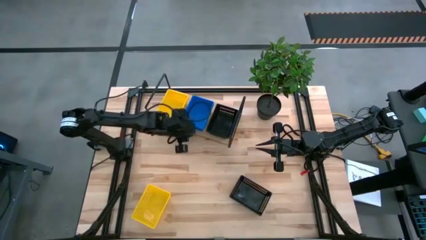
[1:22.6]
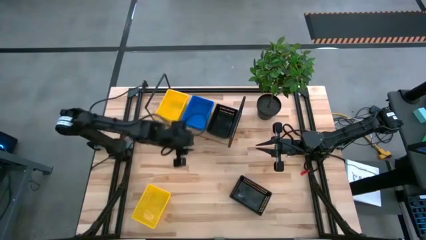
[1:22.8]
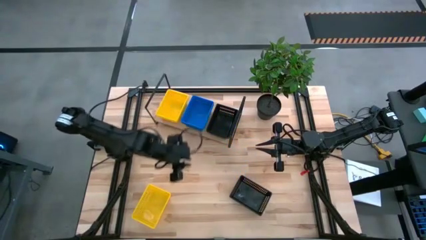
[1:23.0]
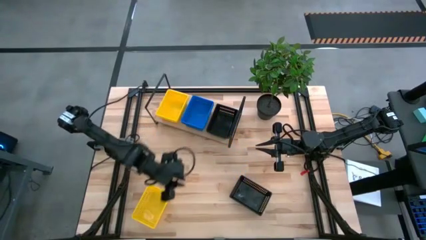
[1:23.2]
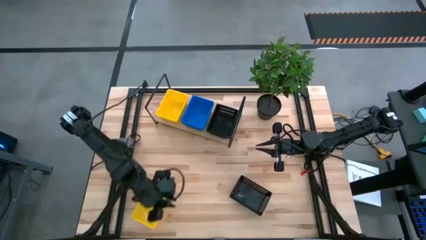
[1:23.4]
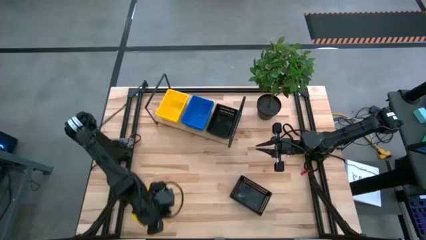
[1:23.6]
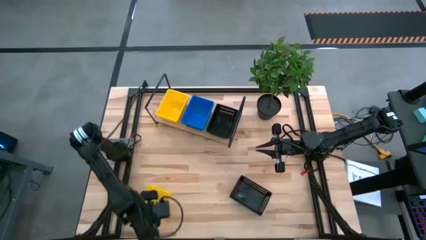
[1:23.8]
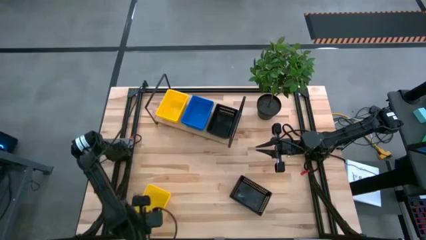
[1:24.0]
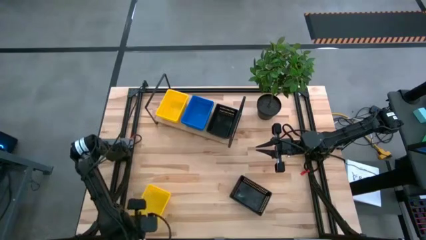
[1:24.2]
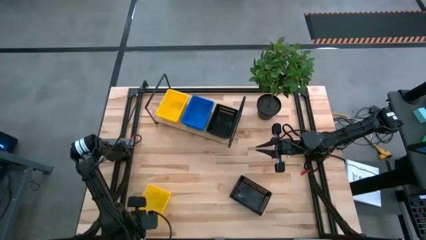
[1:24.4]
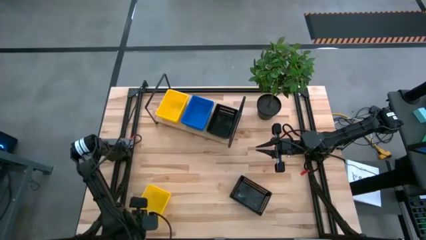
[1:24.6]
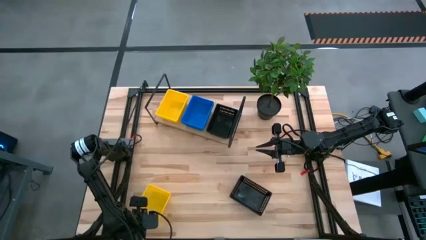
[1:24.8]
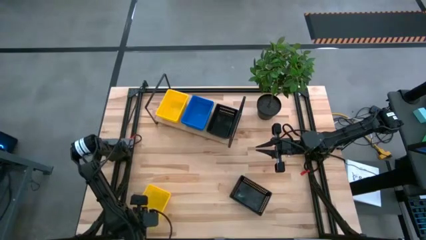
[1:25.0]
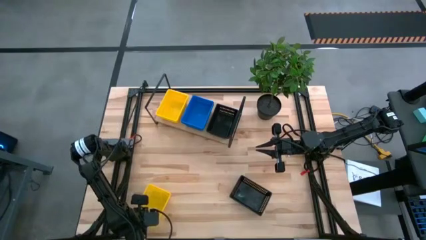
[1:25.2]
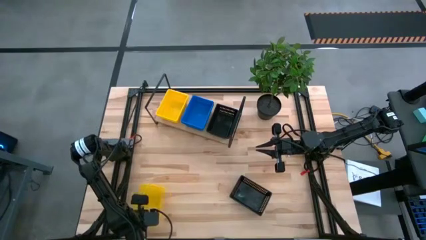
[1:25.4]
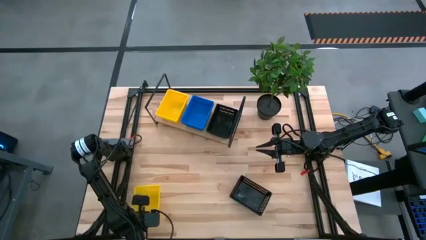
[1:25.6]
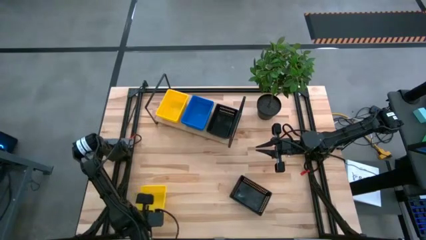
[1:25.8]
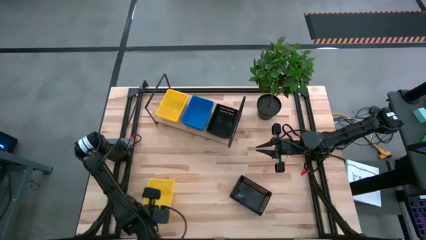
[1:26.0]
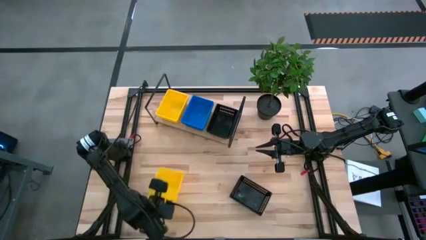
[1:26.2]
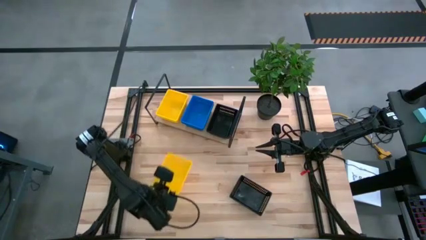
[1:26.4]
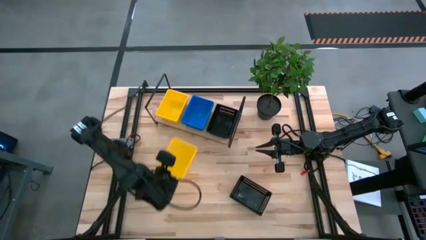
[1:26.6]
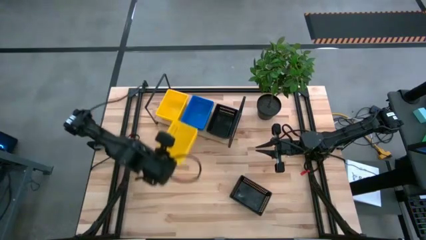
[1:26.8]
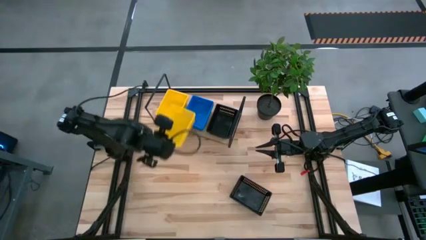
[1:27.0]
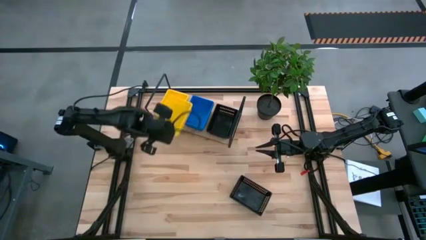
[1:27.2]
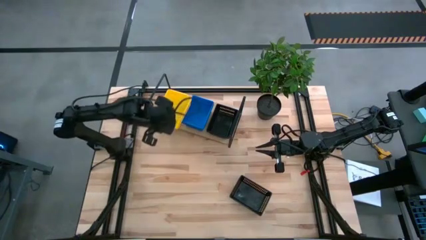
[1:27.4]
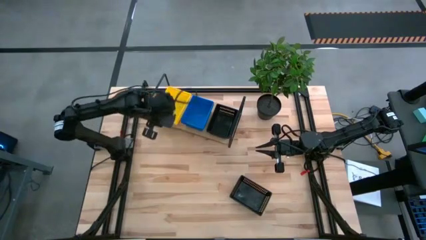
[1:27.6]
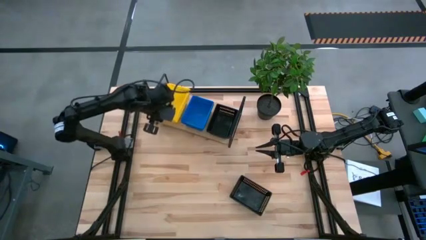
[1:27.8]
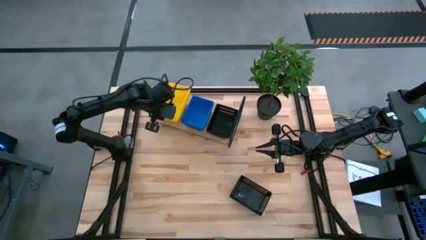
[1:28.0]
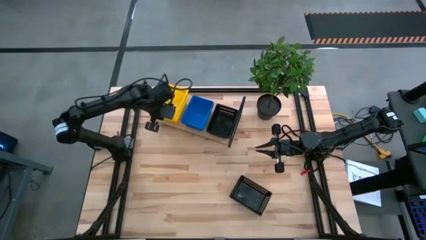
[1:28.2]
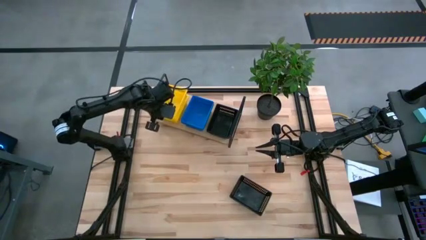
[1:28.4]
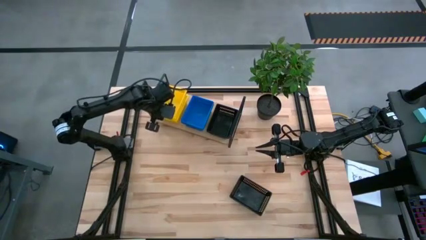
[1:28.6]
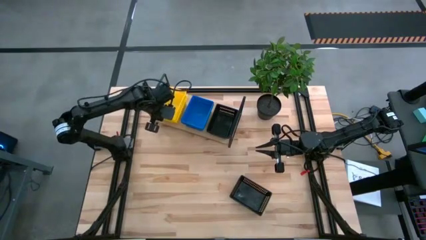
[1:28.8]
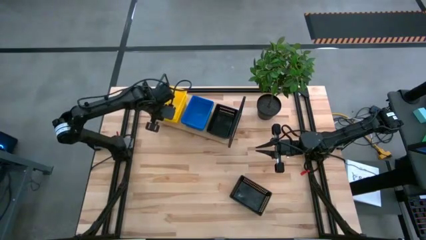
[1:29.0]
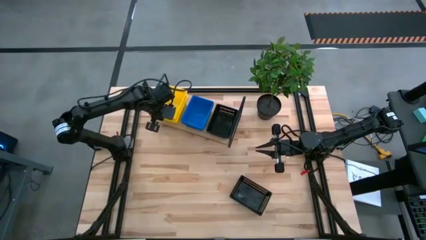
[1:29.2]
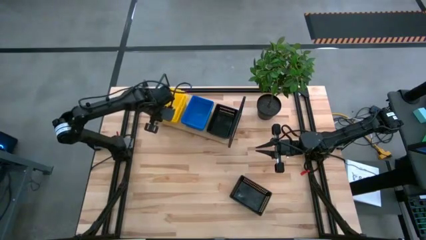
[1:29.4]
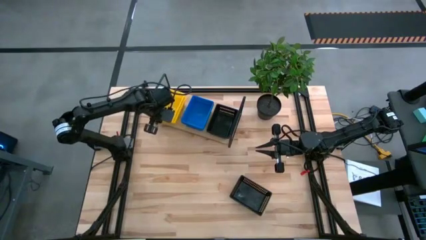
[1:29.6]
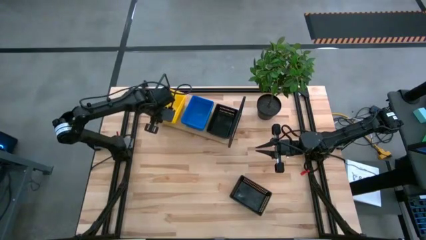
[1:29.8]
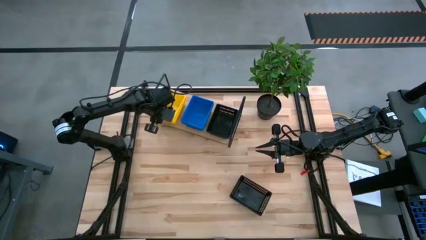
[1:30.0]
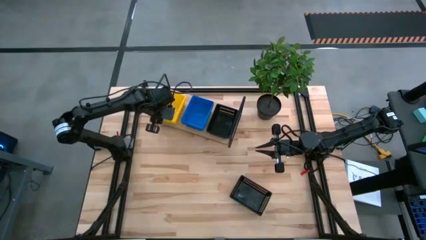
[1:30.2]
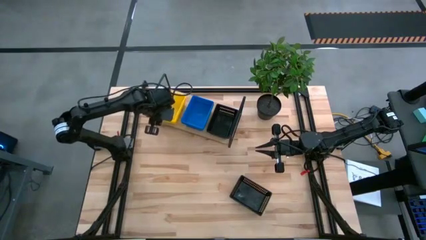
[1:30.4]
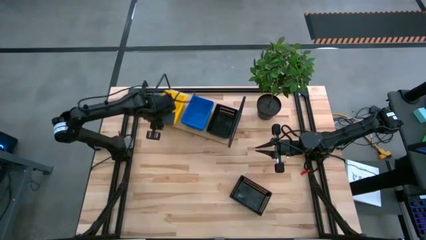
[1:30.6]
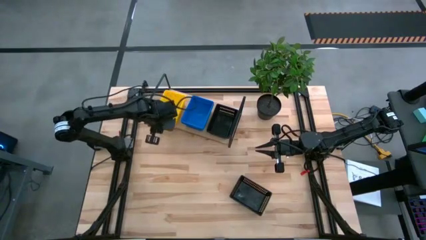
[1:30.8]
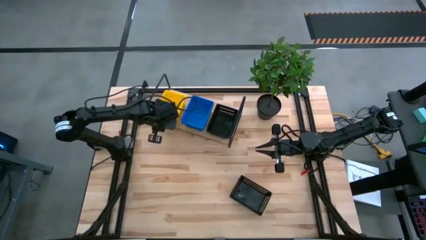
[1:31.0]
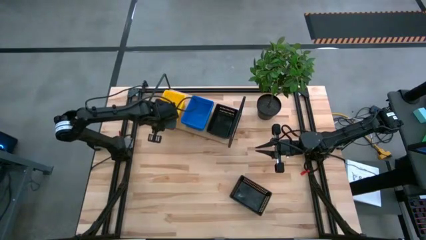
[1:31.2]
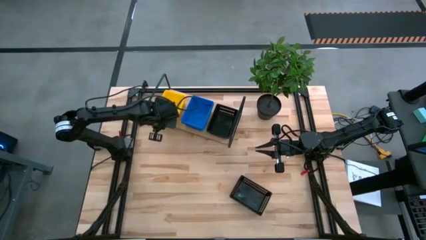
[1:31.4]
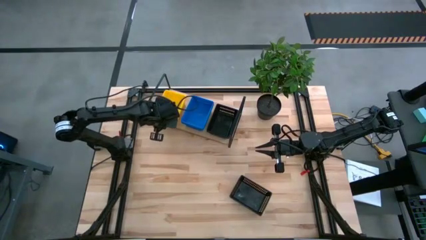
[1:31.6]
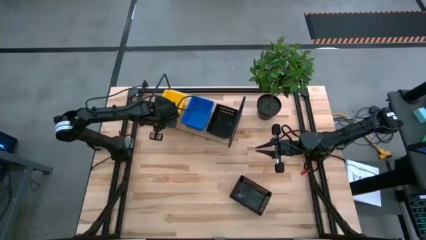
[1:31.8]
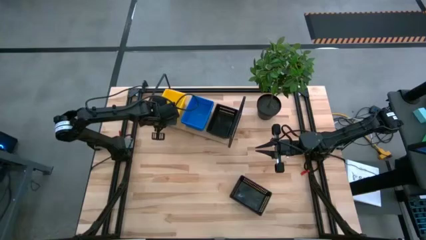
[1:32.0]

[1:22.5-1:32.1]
Task: Stack baskets on shelf by color
Stack the yellow basket on top of the other yellow baskets on the shelf

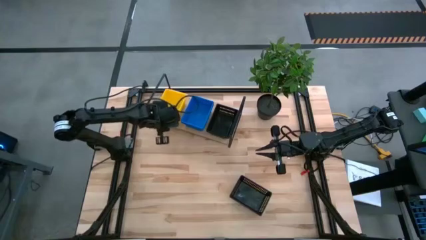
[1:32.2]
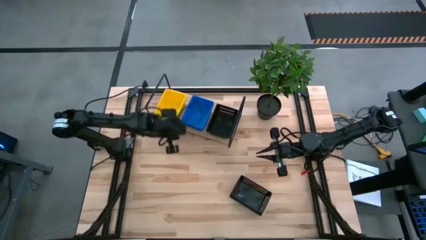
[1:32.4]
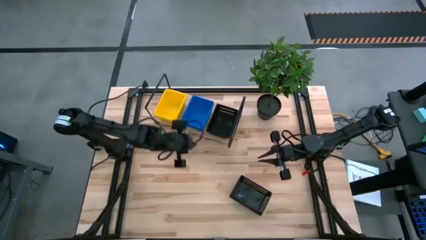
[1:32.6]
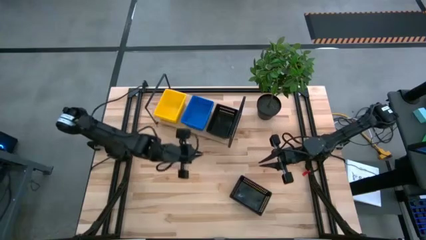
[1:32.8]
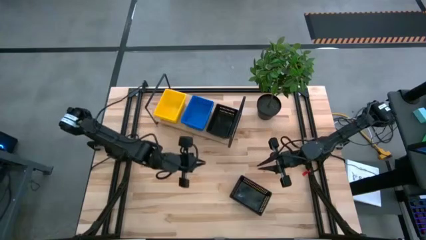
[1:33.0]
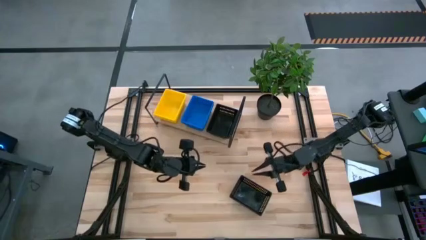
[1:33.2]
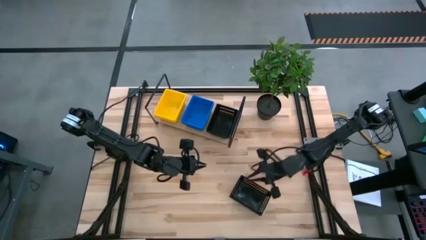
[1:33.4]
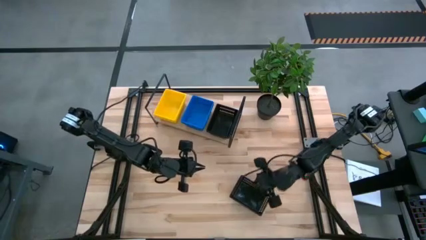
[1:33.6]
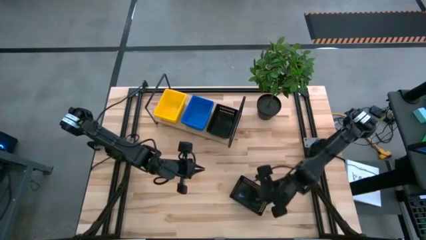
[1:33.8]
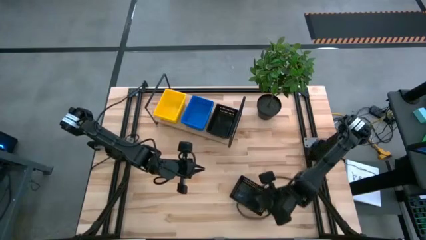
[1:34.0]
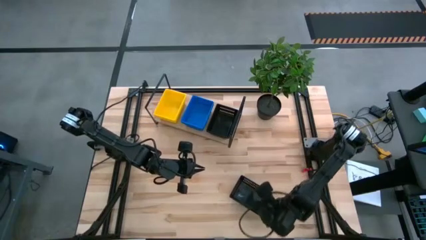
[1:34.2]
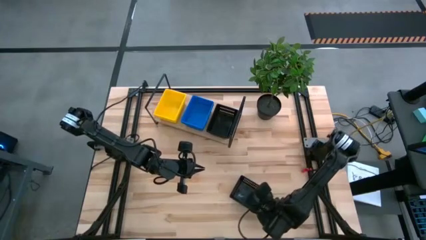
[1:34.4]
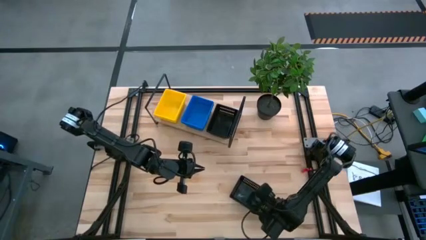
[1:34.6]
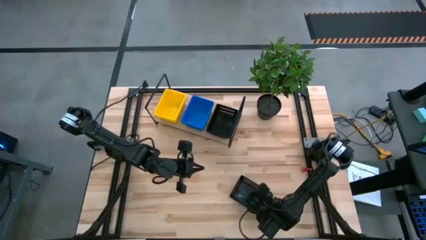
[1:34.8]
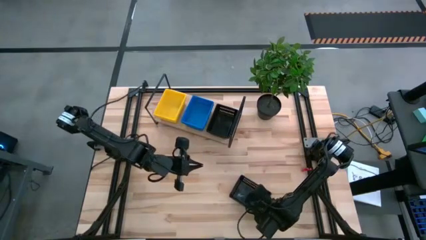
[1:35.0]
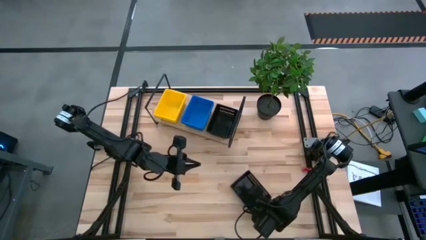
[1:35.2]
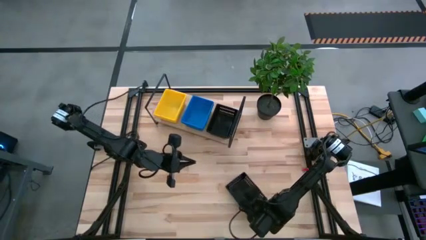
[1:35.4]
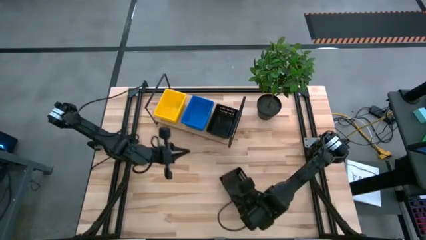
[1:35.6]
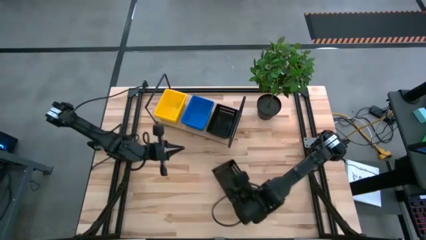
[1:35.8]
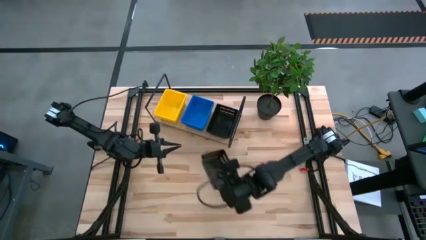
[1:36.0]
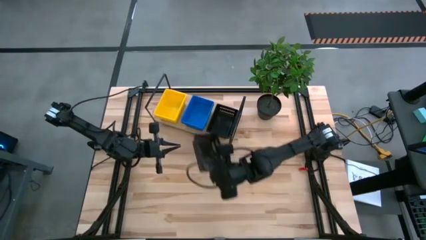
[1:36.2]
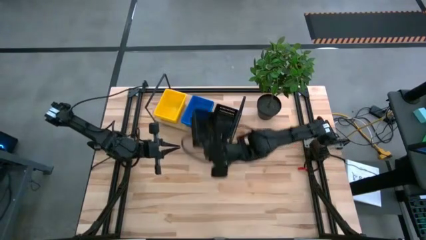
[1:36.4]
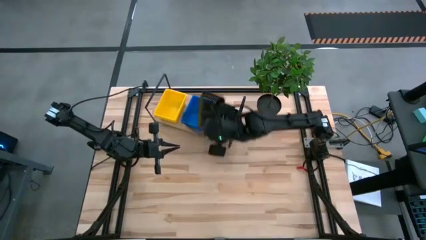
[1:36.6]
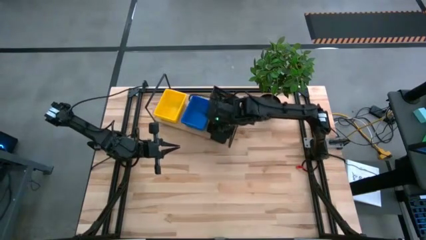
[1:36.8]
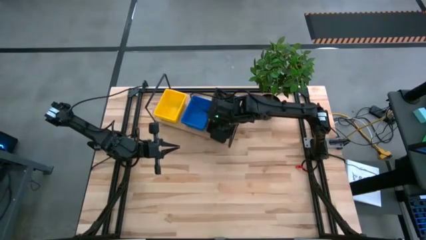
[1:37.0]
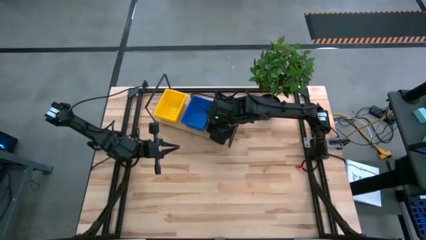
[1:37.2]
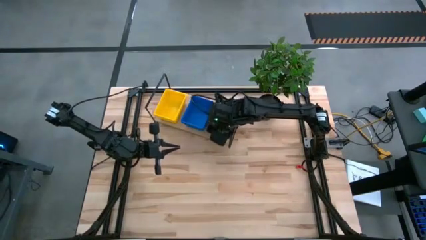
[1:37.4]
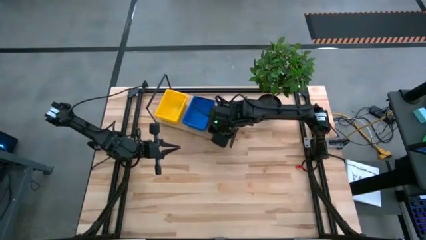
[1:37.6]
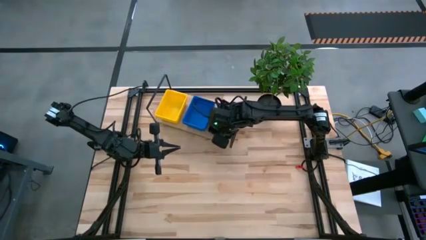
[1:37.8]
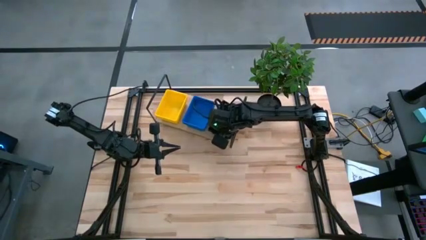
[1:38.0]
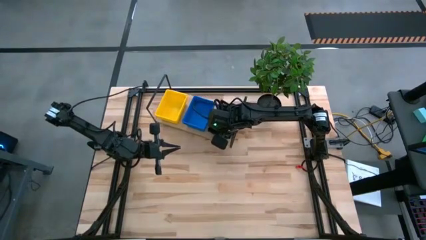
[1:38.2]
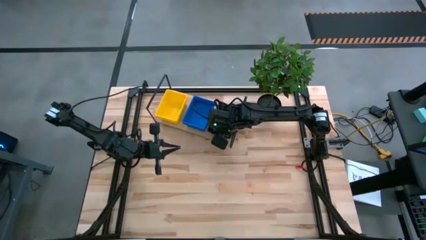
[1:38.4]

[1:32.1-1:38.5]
Stack the black basket on top of the other black baskets on the shelf

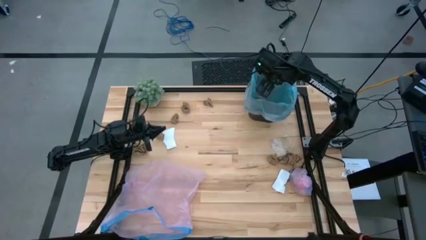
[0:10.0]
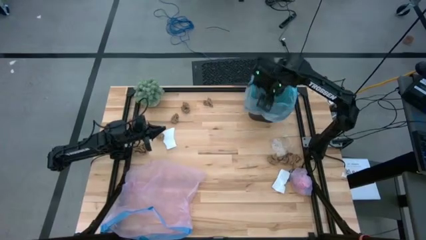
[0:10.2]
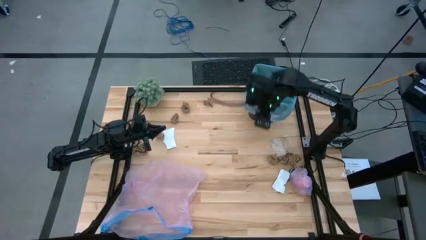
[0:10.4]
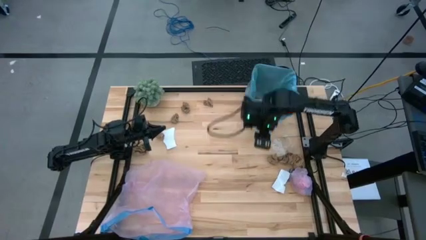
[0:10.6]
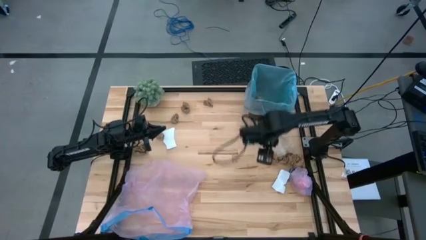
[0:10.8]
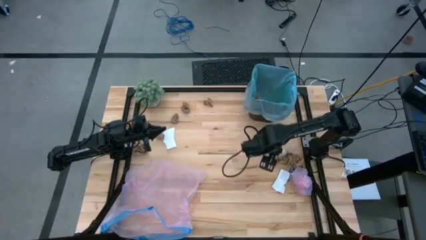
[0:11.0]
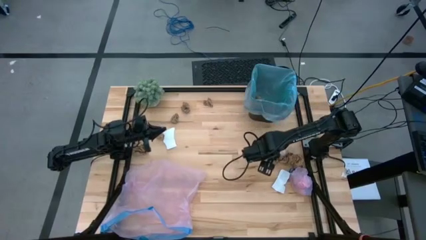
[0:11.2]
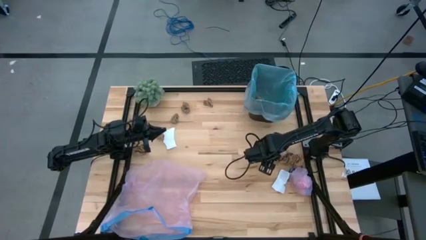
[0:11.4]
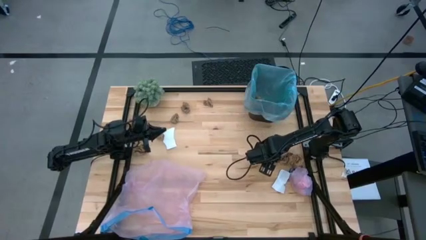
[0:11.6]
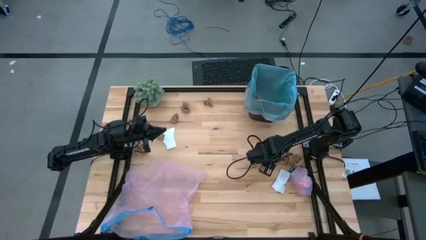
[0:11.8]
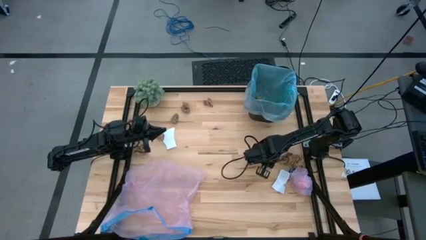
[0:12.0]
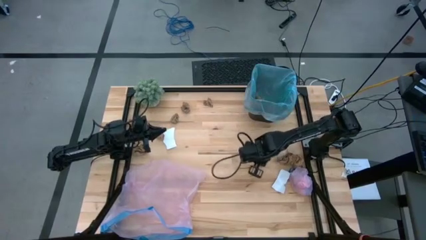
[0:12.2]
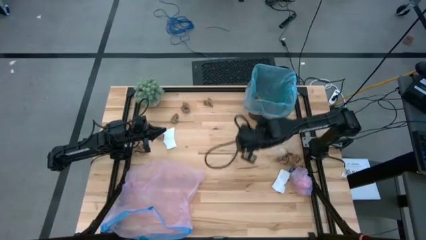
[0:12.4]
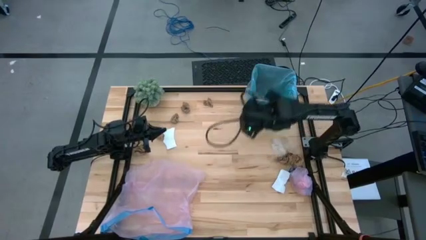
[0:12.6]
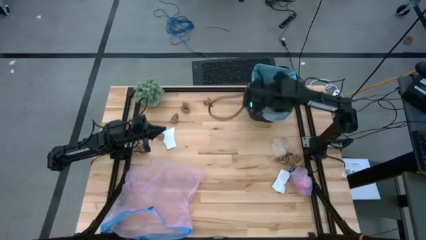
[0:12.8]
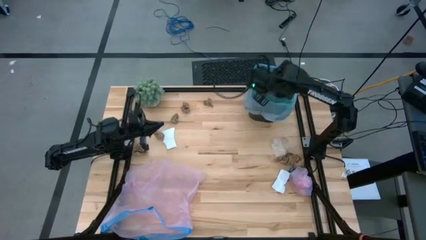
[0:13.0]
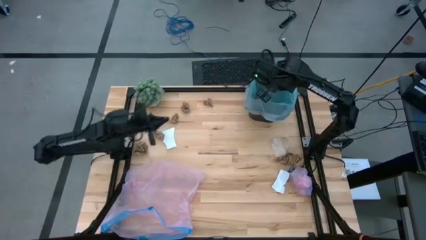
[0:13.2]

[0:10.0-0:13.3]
Task: place trash/remove bag and relplace
Put the brown napkin into the trash bin
